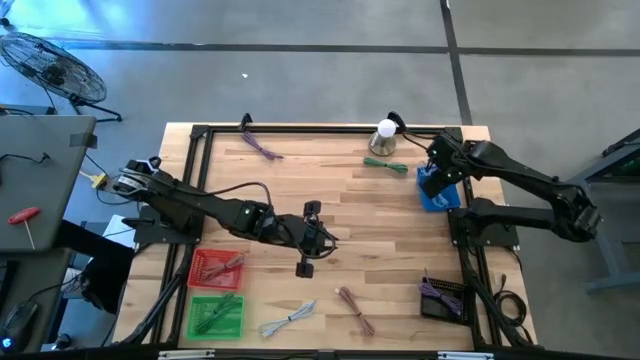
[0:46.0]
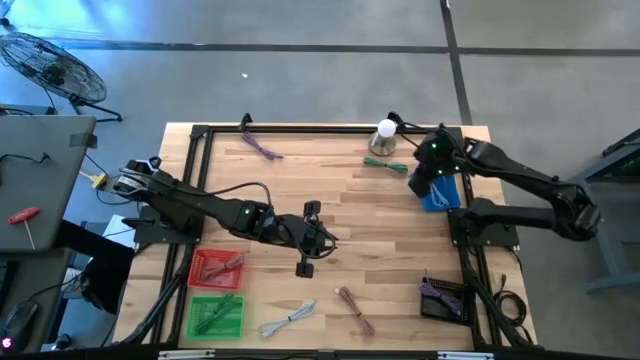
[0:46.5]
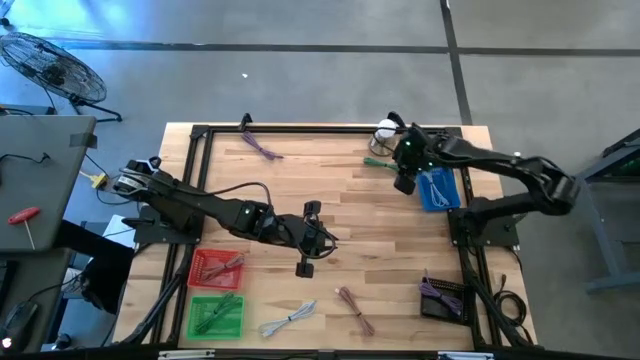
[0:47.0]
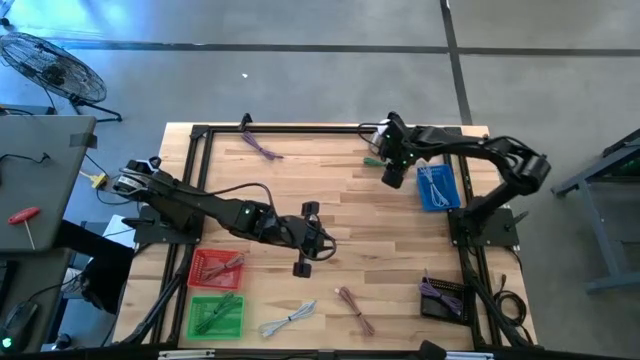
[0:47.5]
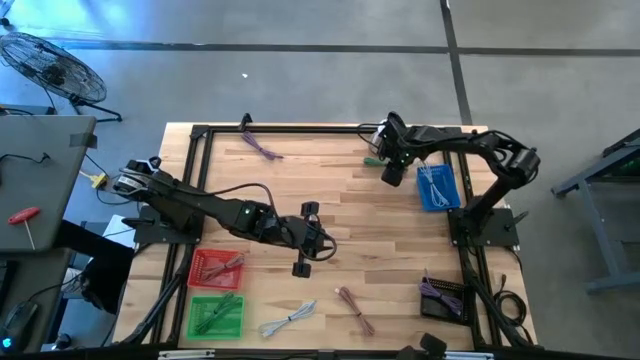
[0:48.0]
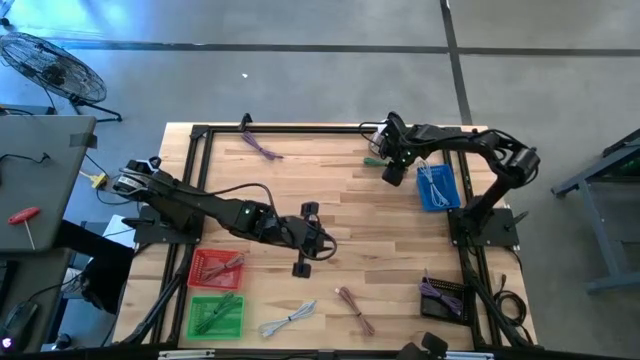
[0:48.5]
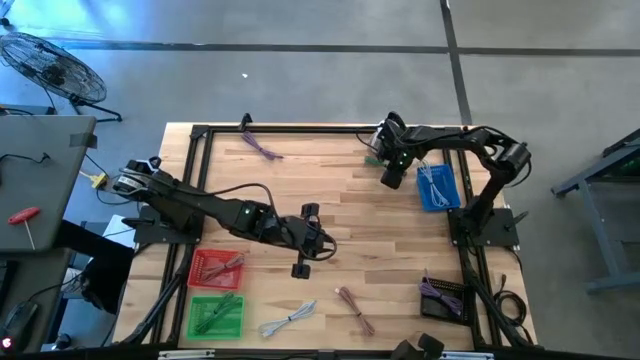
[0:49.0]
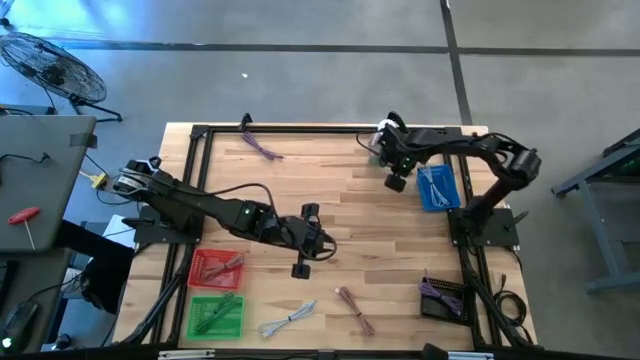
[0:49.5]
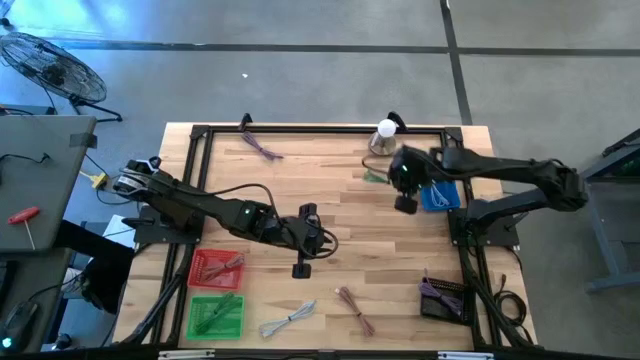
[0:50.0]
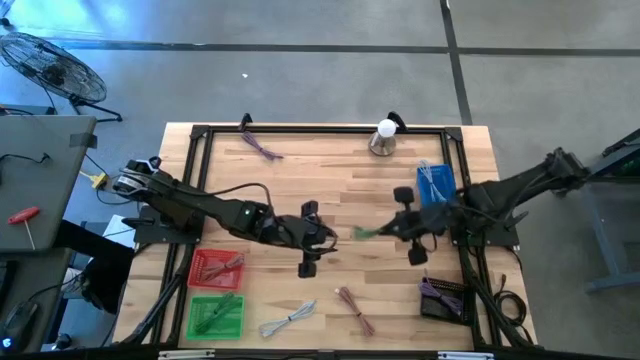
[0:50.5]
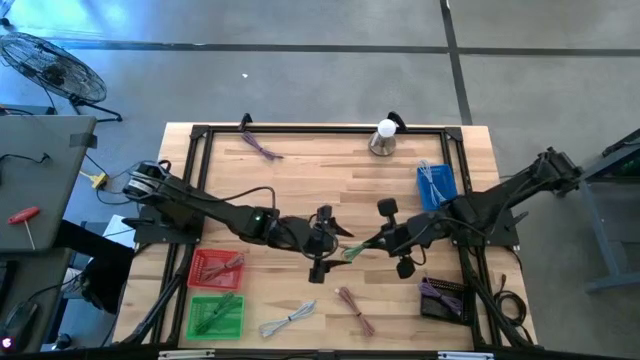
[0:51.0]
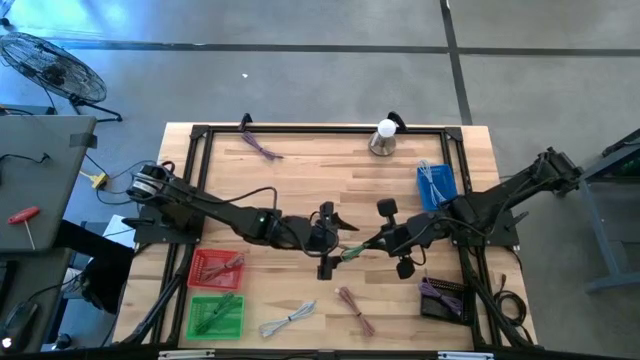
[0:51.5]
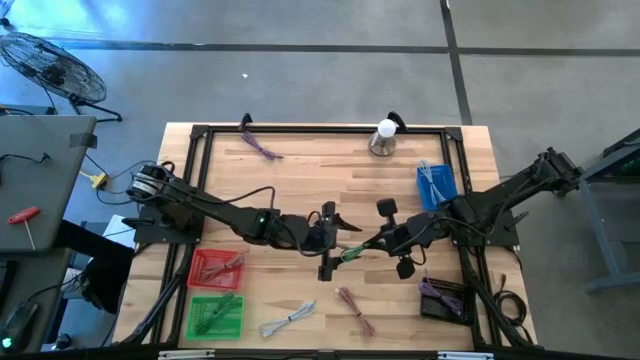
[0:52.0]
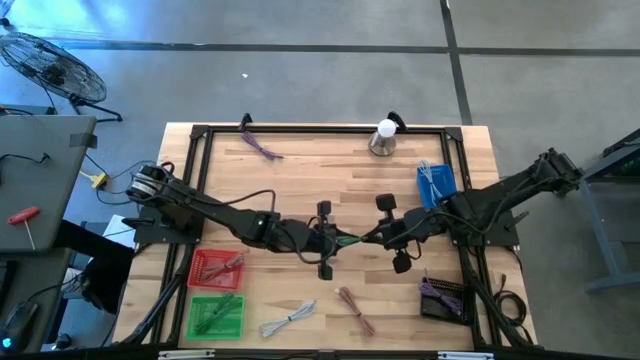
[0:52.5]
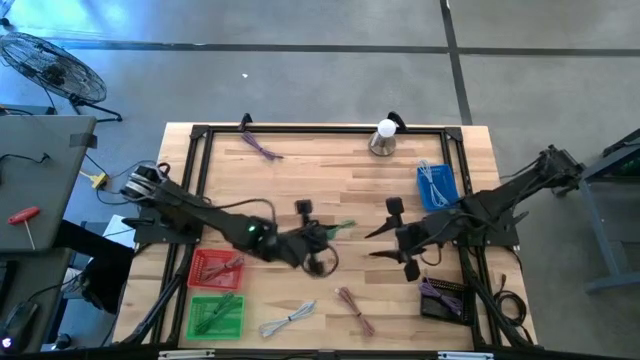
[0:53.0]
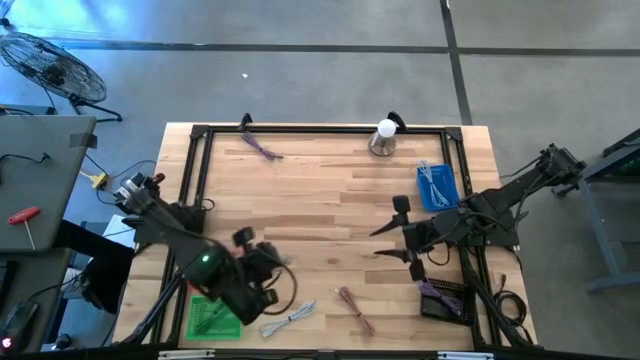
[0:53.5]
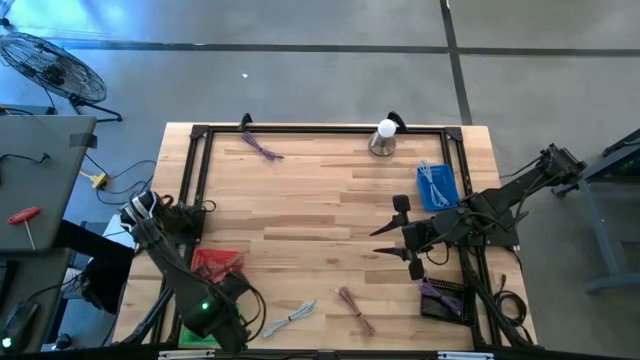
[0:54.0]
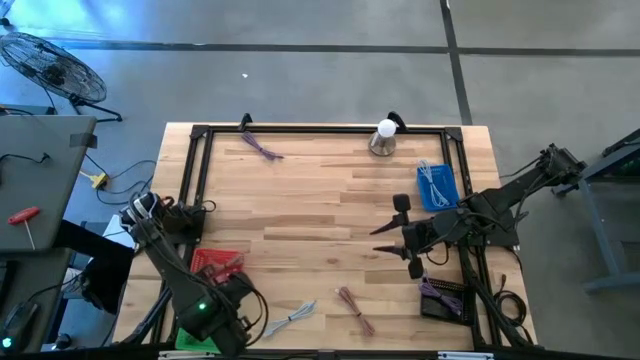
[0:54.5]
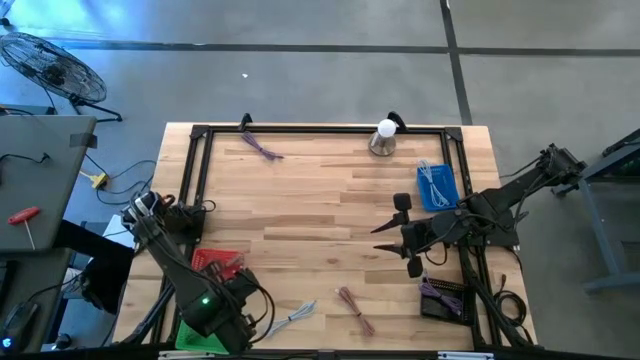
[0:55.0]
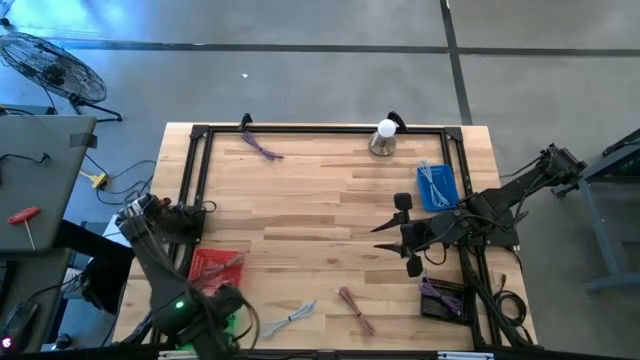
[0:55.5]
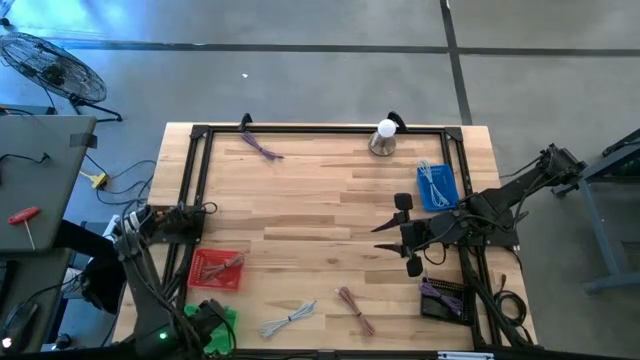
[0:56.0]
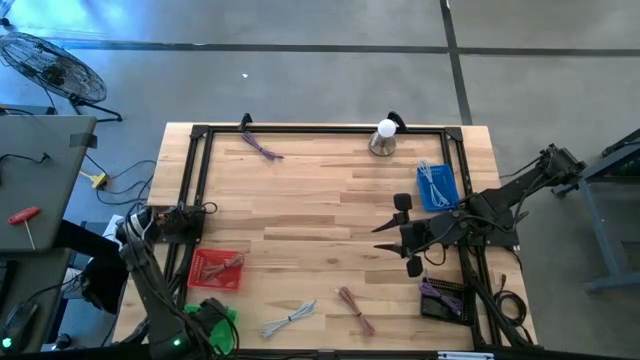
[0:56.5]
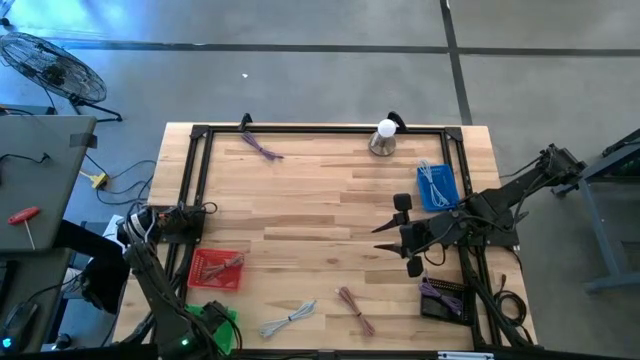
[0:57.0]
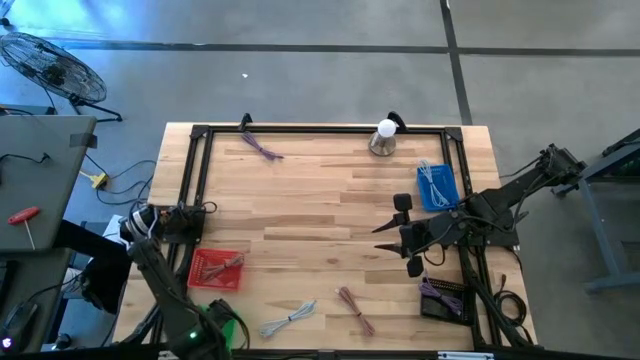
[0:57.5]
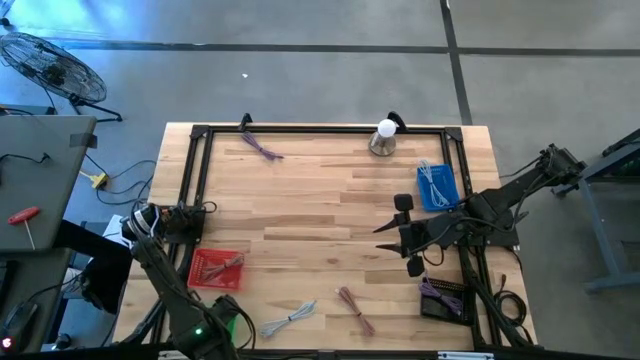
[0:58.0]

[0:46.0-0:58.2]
Task: Pick & Place USB Port
Put the green charger cable into the green bin

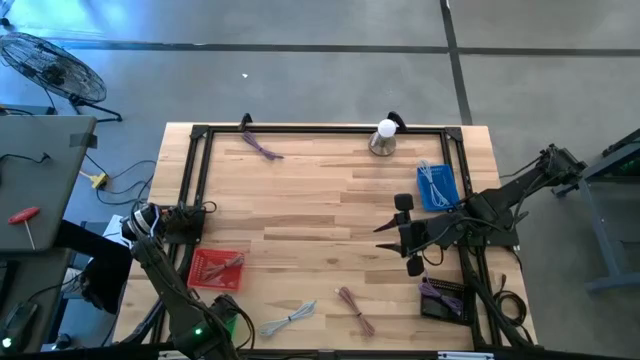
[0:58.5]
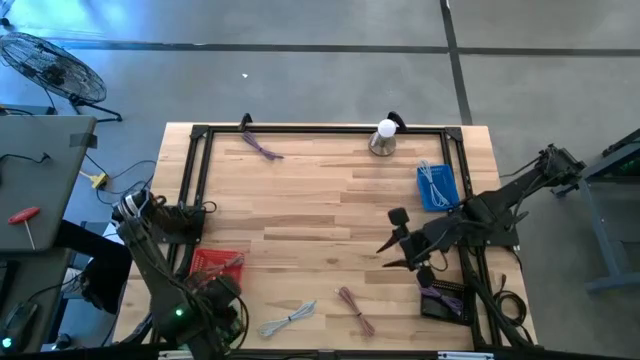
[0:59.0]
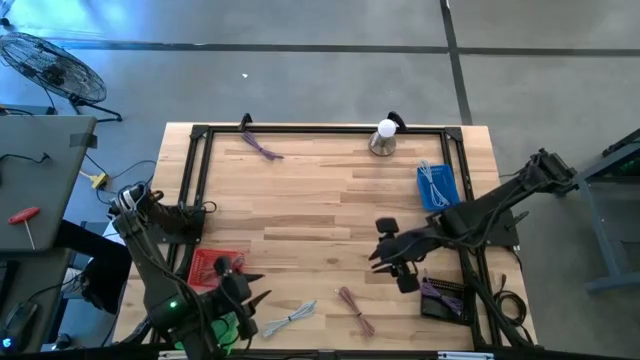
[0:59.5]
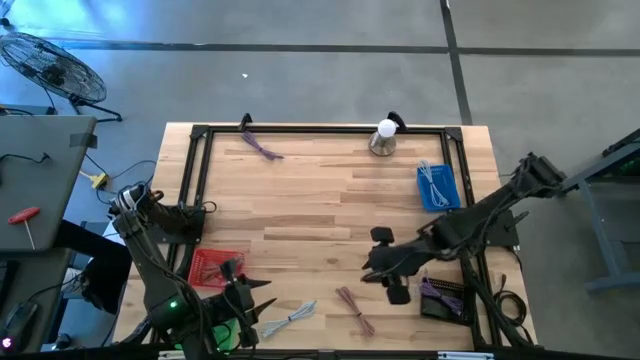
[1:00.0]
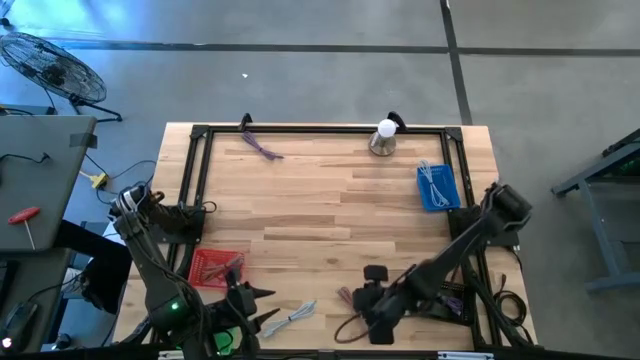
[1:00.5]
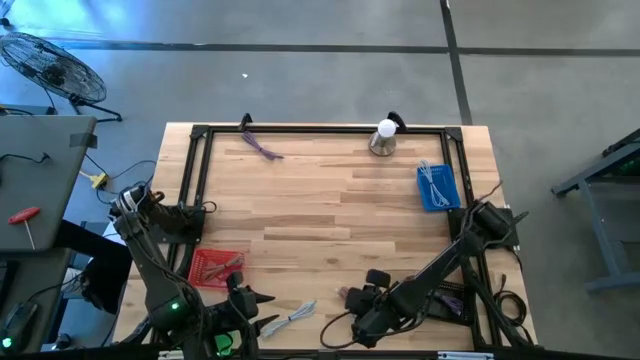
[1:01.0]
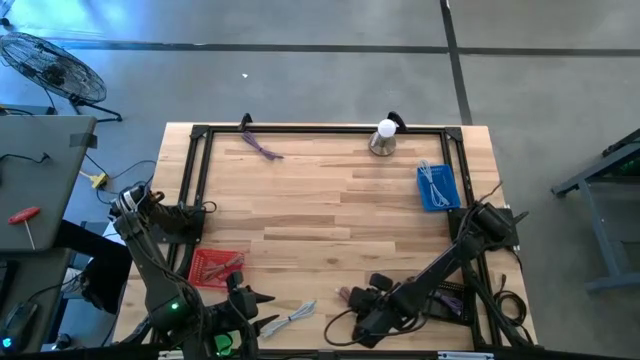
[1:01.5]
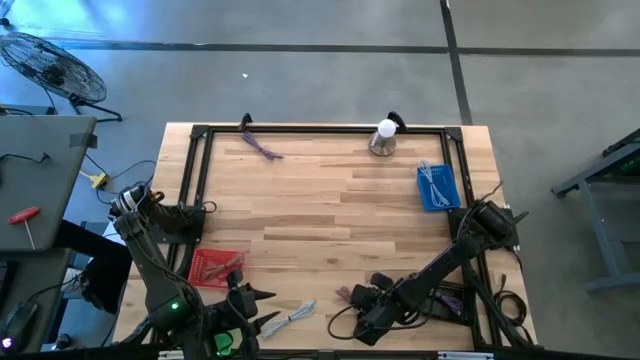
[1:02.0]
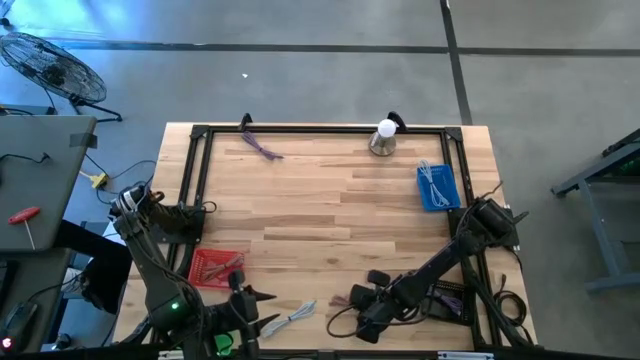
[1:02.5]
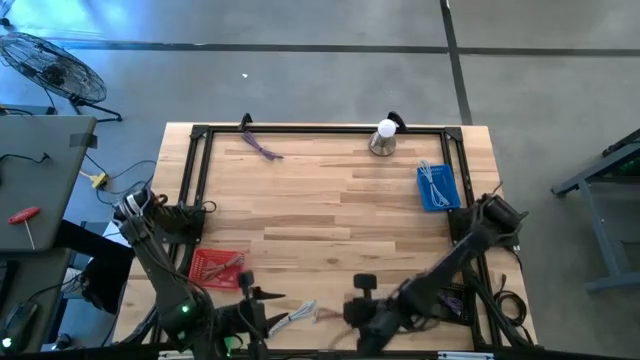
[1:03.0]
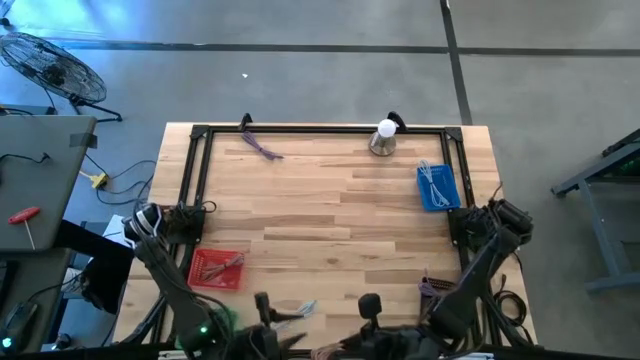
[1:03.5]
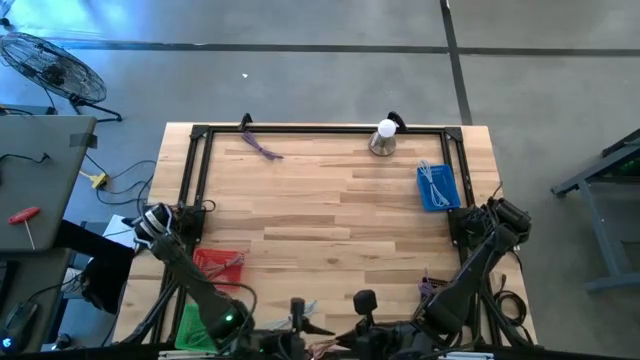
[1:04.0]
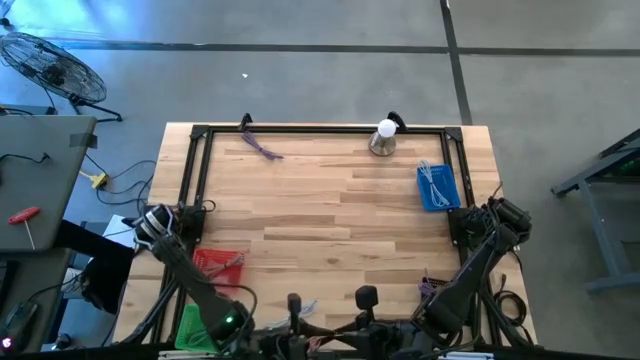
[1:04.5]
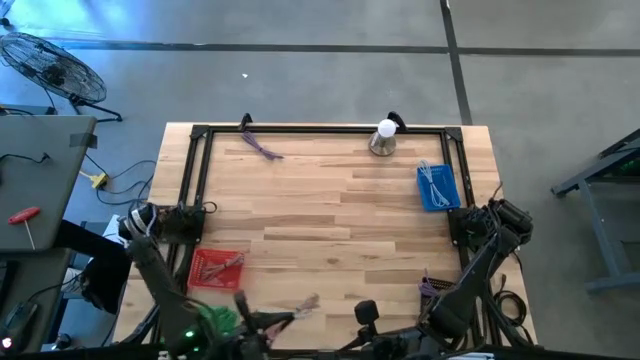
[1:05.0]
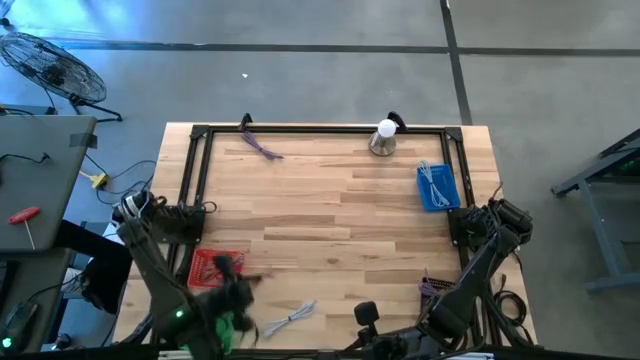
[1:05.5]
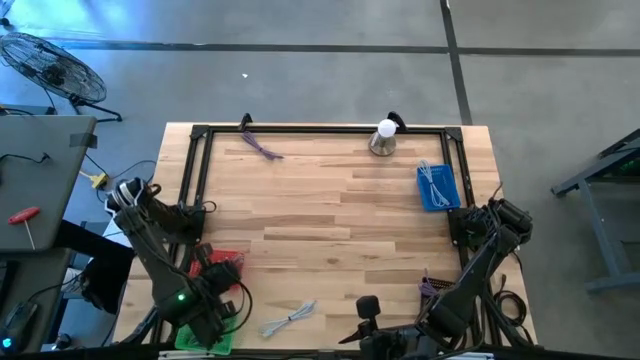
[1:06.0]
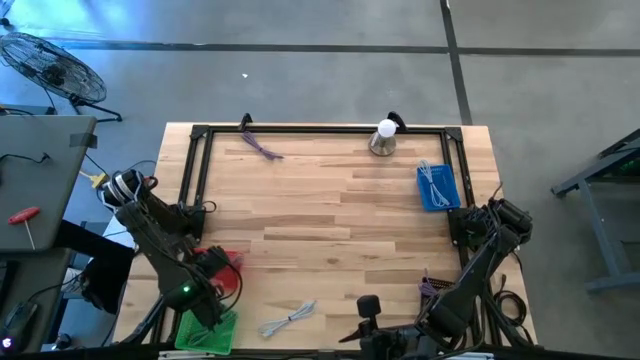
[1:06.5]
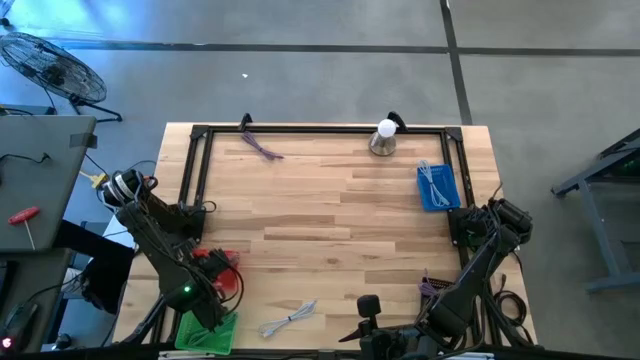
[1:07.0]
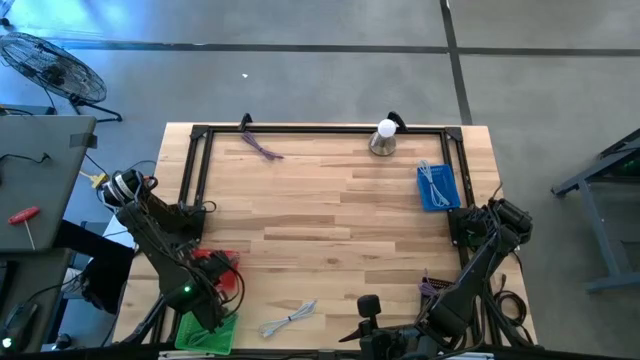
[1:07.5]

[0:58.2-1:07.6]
Put the pink charger cable into the red bin

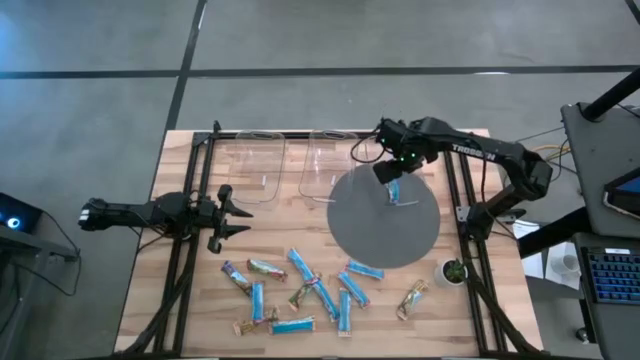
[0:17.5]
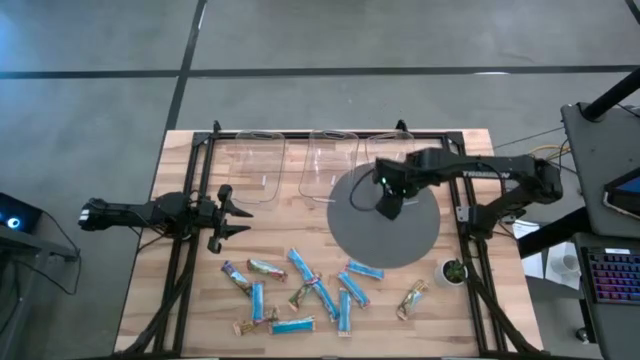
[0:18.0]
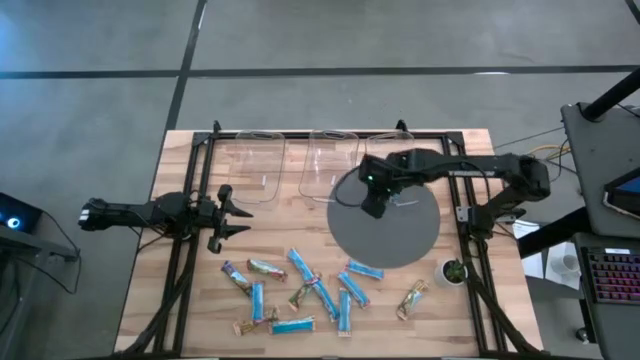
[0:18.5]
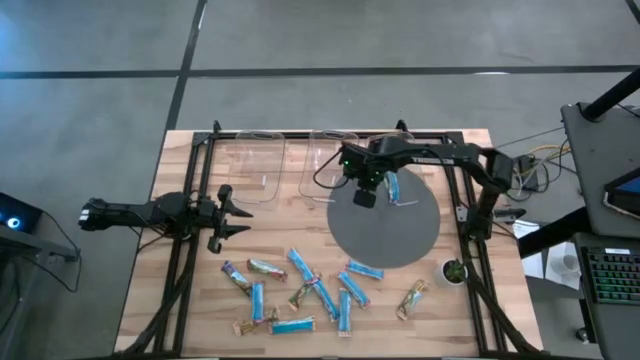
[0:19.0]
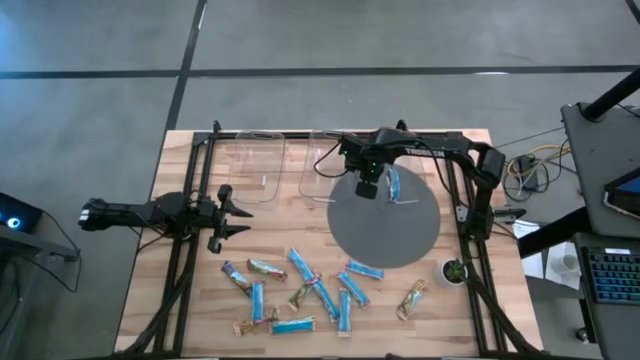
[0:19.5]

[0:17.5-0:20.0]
Task: Pick and place Granola Bars by type
Adjust the right transparent bin
